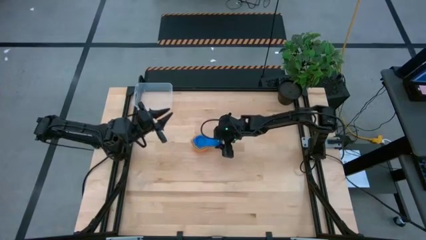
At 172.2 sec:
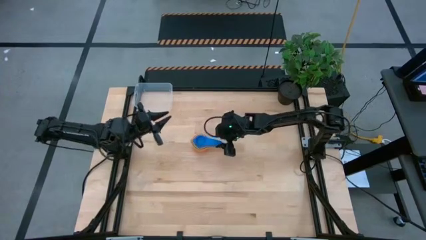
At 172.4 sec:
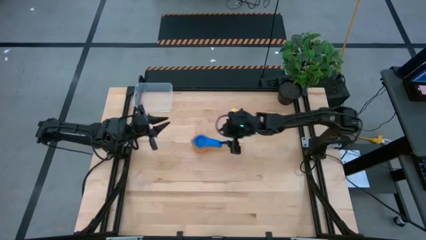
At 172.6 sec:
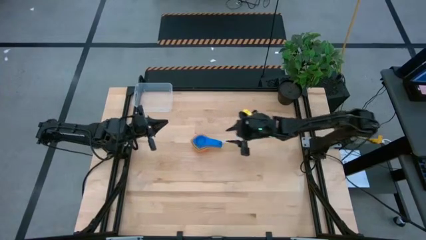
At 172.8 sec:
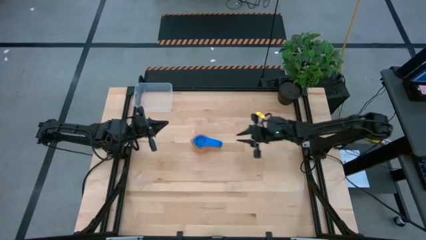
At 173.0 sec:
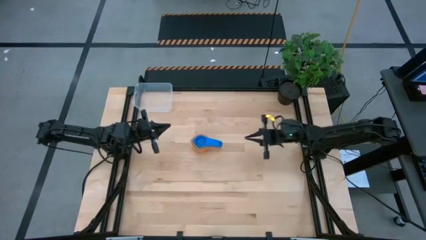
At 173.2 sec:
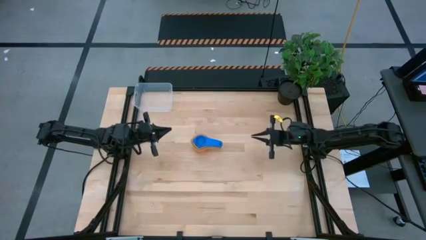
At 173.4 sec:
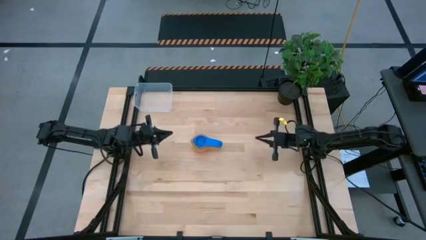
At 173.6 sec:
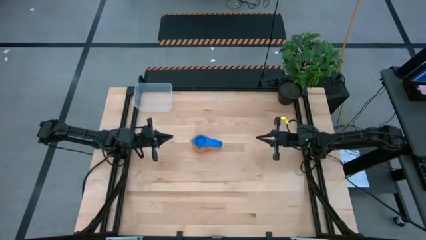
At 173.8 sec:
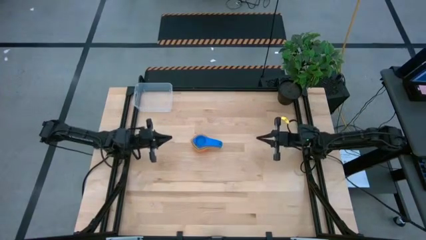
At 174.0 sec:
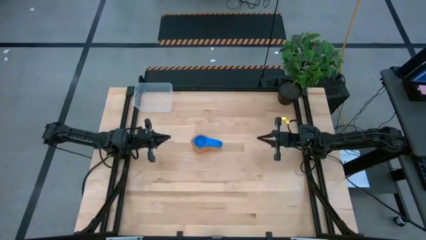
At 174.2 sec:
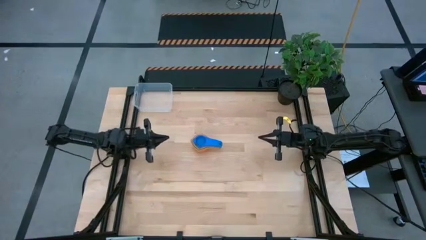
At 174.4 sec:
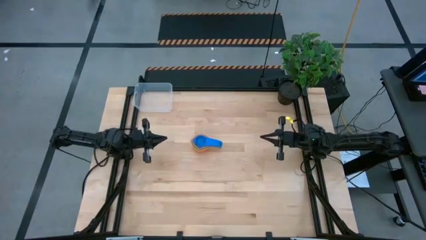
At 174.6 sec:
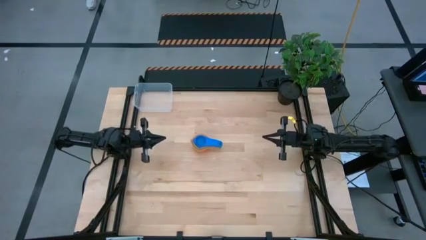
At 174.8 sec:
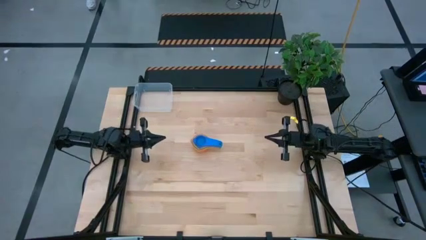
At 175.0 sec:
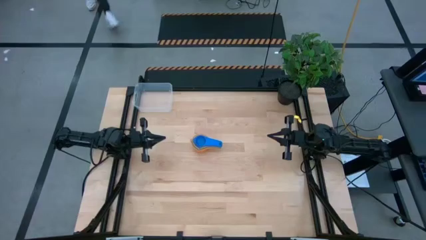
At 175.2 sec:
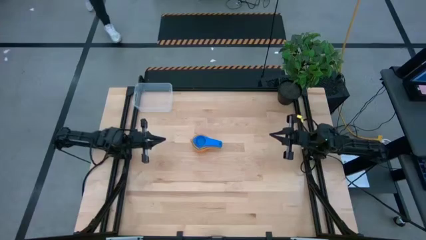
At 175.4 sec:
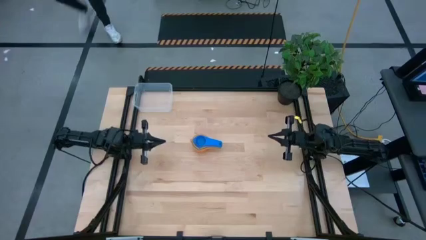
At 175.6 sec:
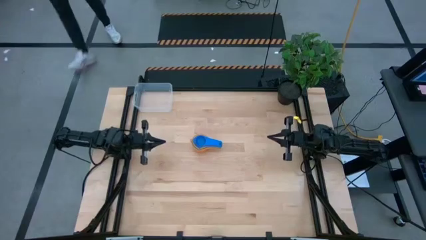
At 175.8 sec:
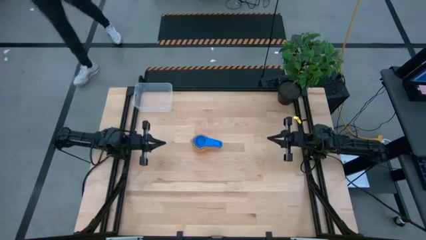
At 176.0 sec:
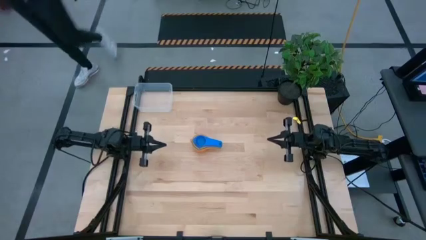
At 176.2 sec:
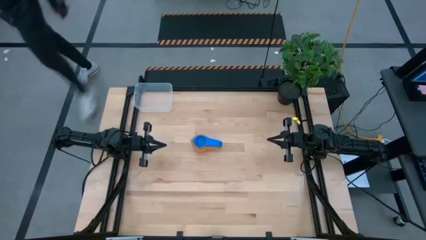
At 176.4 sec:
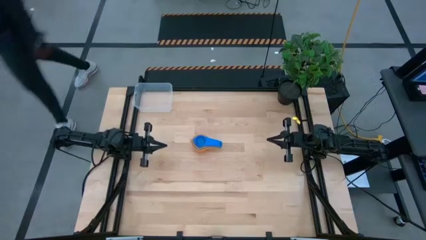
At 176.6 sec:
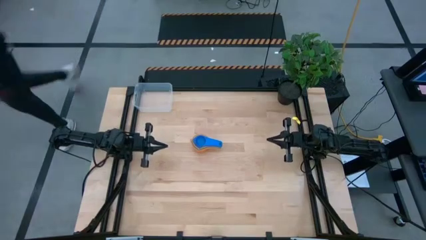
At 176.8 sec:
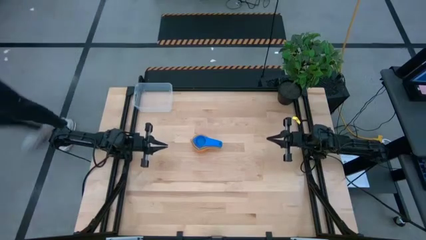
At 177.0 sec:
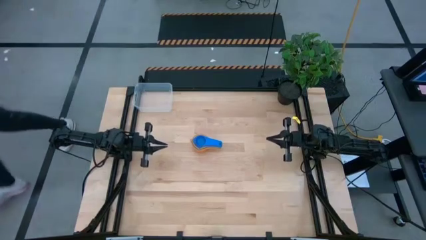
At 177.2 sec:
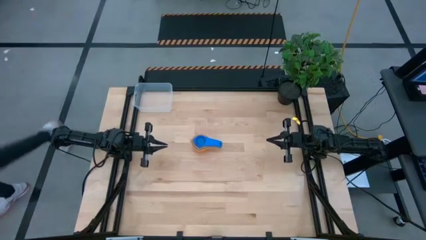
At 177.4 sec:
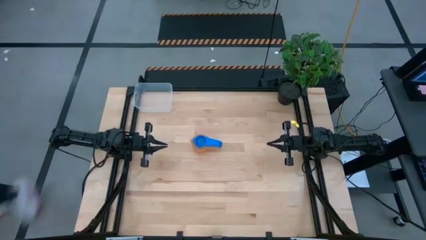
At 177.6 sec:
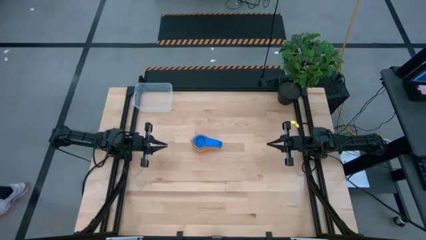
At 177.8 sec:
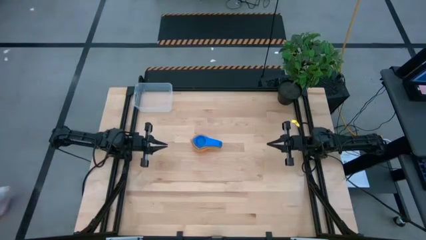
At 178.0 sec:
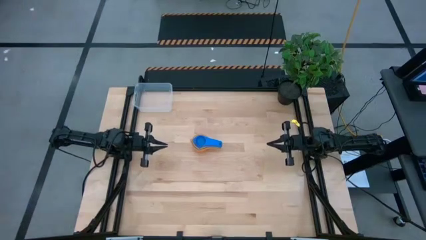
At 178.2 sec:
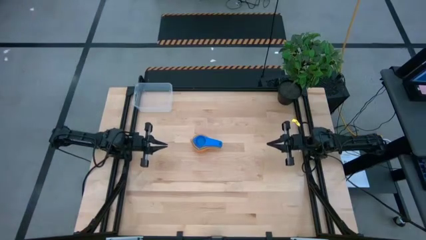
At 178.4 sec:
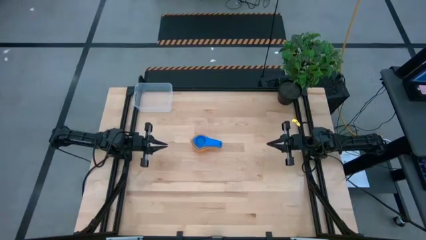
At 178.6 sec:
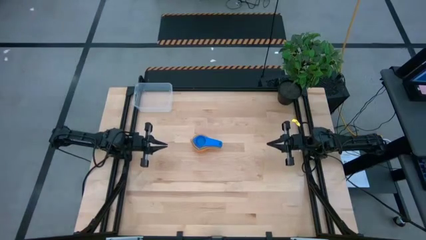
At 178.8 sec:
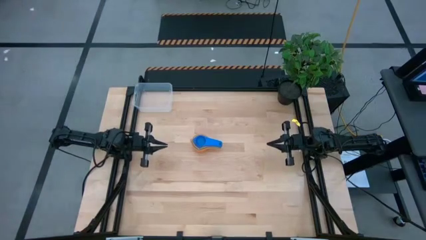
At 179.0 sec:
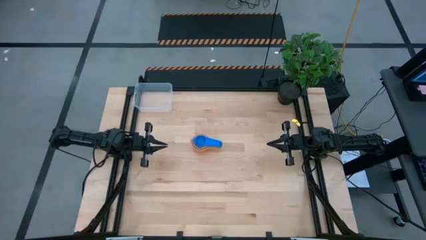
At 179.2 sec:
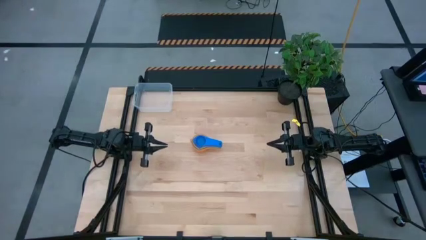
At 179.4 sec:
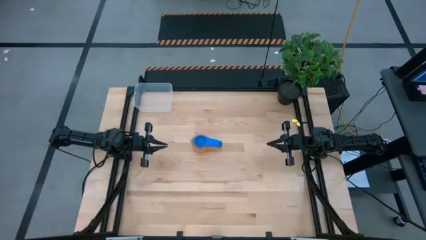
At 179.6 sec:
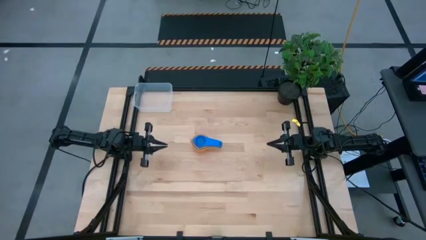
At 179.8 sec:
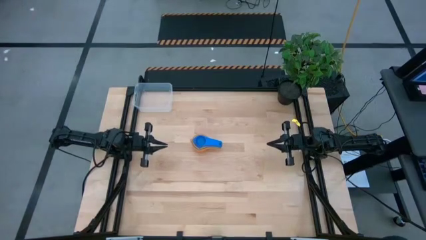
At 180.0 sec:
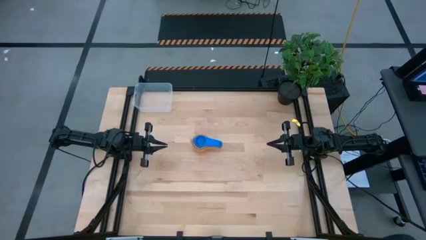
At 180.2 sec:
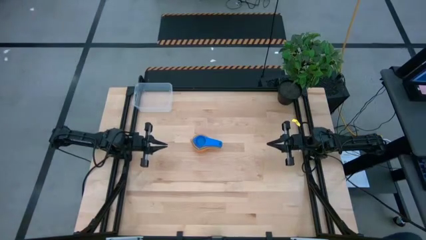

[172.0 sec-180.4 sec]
Task: Nest measuring cups in basket
Return to Home Position

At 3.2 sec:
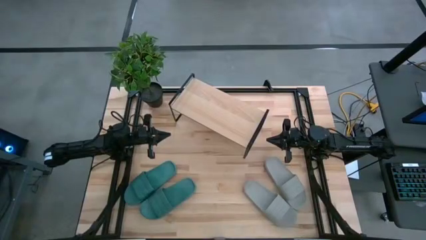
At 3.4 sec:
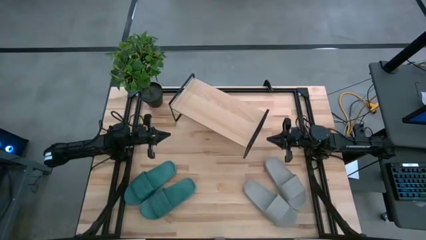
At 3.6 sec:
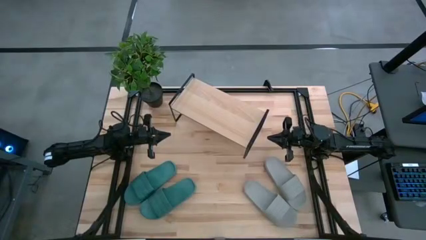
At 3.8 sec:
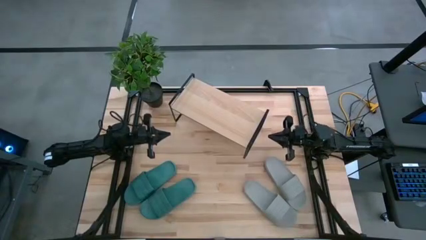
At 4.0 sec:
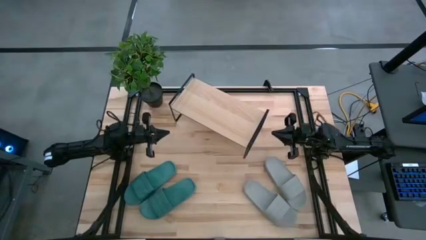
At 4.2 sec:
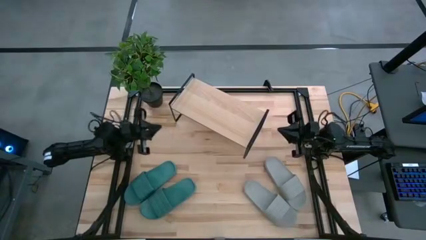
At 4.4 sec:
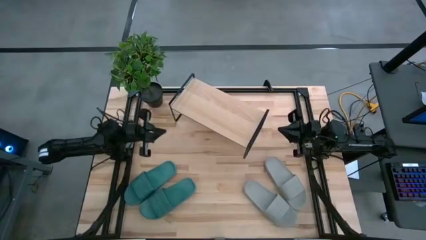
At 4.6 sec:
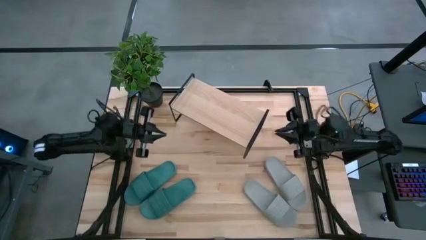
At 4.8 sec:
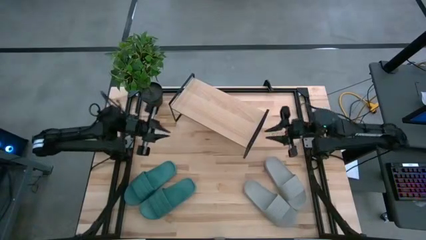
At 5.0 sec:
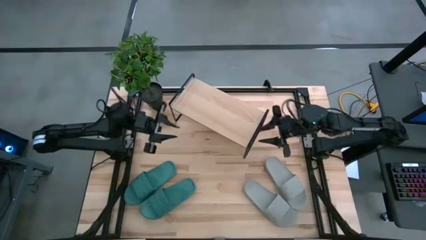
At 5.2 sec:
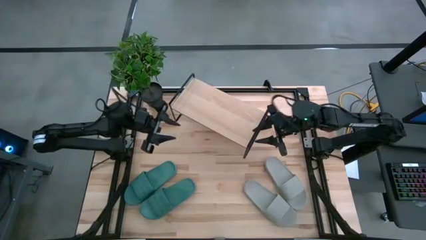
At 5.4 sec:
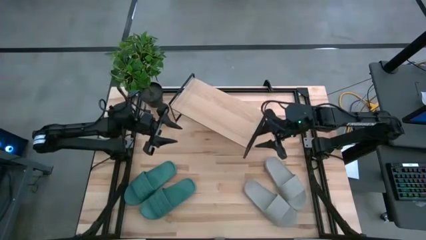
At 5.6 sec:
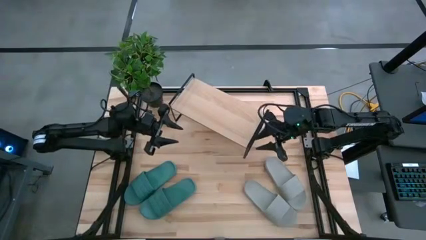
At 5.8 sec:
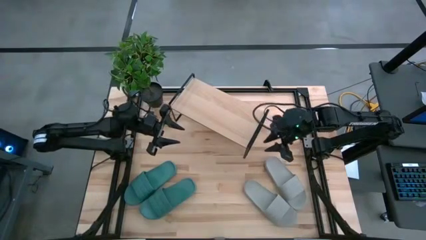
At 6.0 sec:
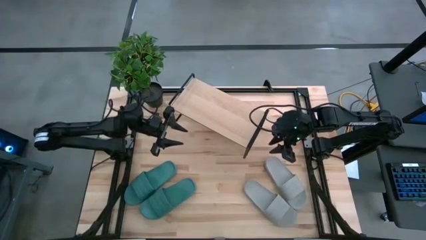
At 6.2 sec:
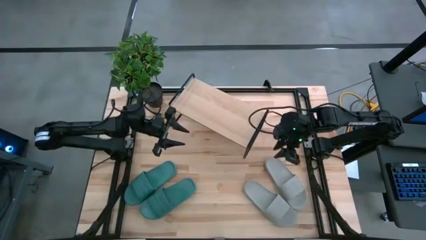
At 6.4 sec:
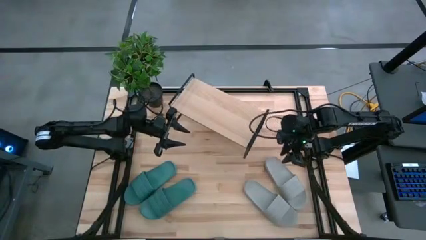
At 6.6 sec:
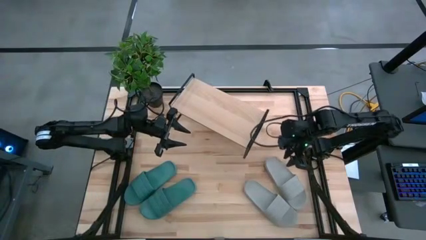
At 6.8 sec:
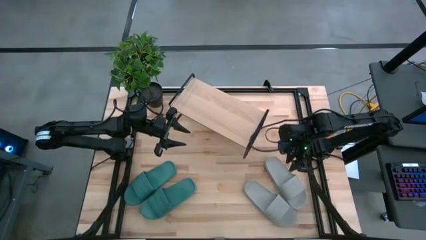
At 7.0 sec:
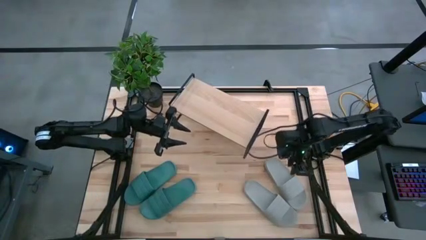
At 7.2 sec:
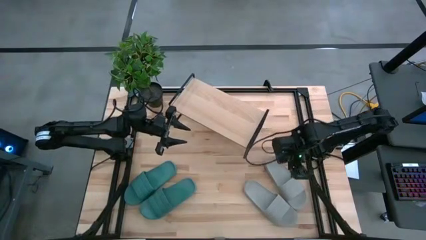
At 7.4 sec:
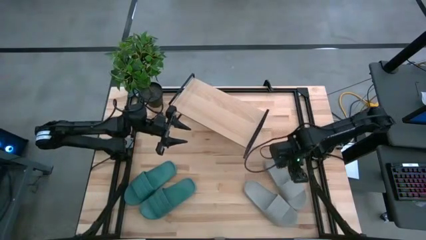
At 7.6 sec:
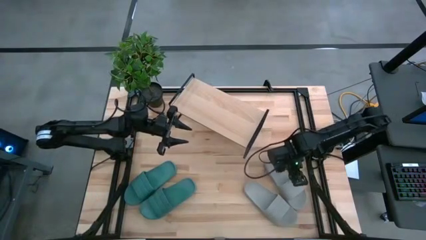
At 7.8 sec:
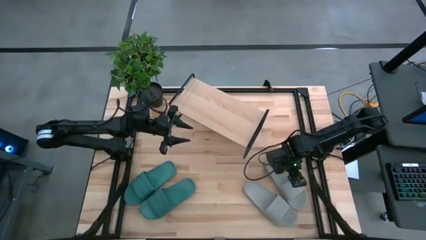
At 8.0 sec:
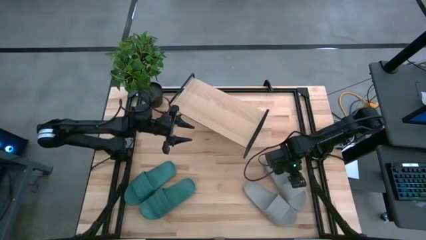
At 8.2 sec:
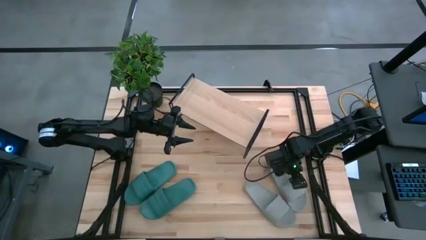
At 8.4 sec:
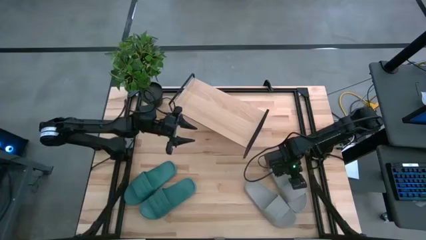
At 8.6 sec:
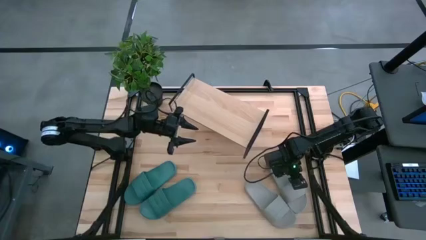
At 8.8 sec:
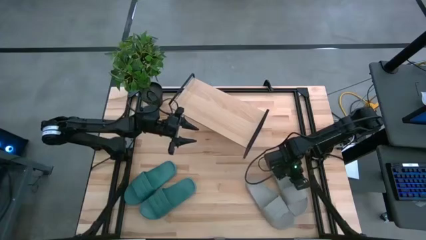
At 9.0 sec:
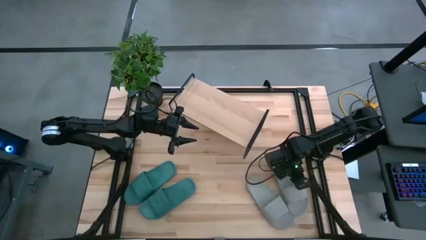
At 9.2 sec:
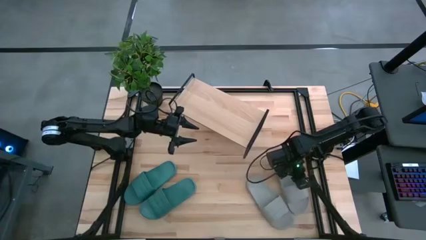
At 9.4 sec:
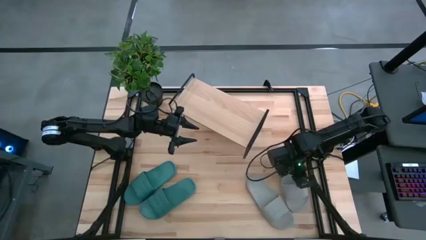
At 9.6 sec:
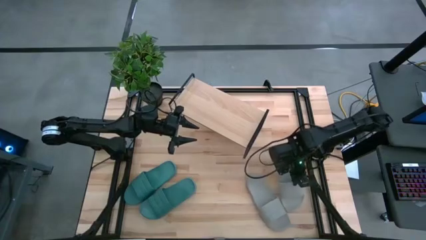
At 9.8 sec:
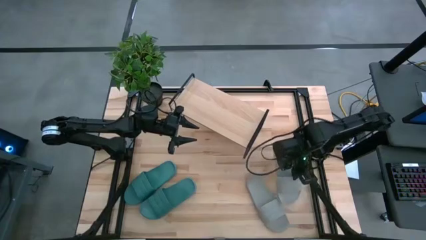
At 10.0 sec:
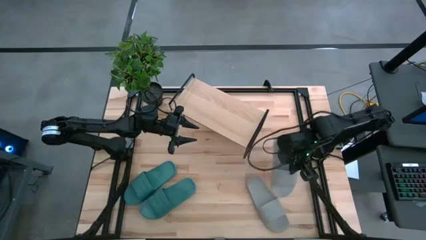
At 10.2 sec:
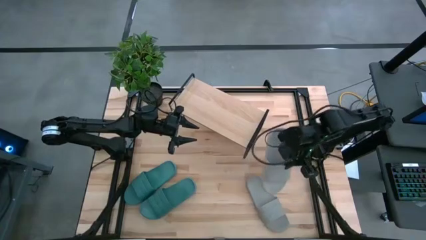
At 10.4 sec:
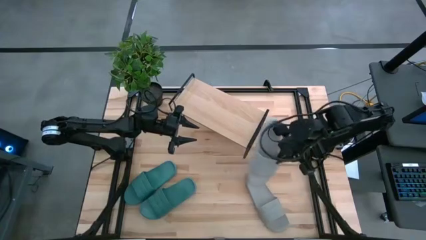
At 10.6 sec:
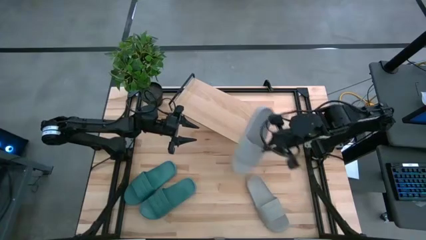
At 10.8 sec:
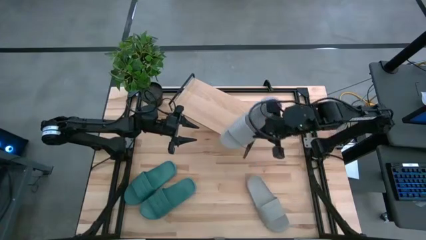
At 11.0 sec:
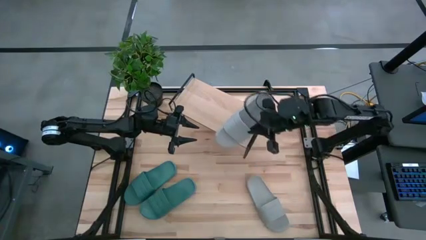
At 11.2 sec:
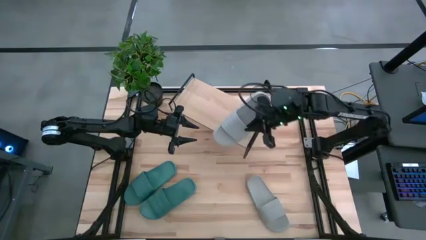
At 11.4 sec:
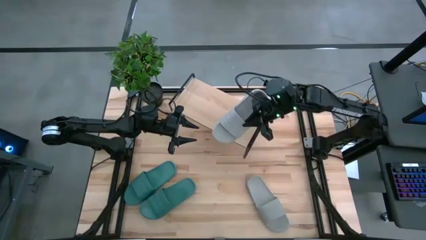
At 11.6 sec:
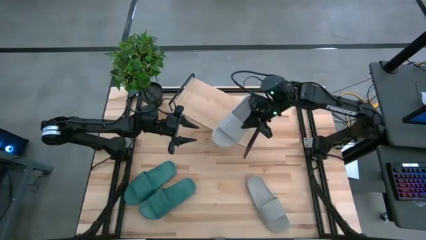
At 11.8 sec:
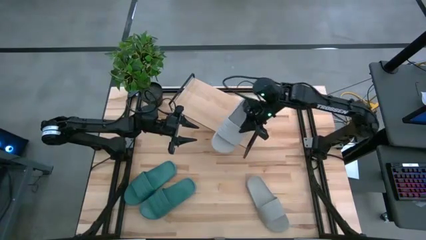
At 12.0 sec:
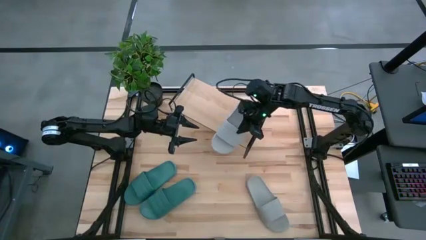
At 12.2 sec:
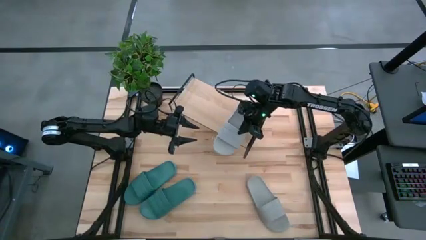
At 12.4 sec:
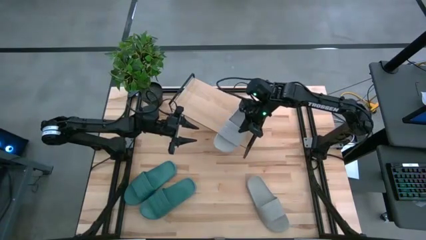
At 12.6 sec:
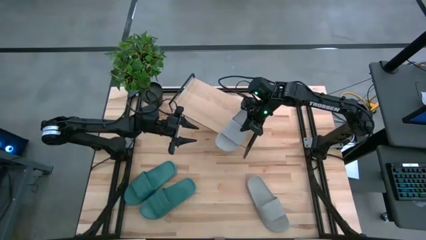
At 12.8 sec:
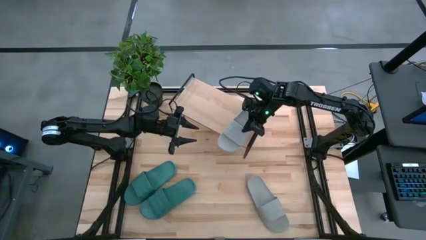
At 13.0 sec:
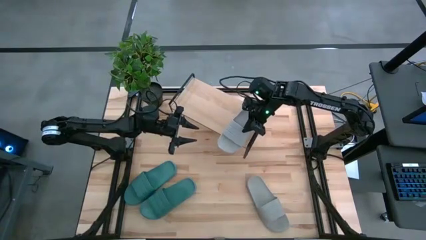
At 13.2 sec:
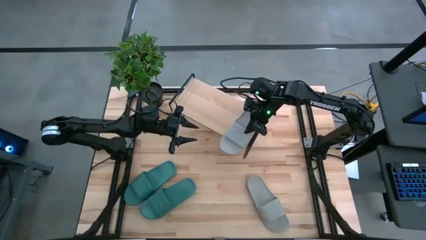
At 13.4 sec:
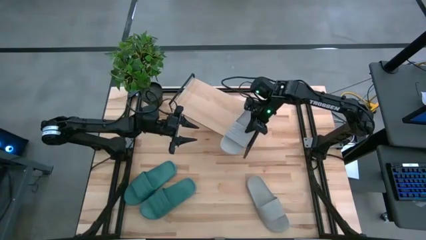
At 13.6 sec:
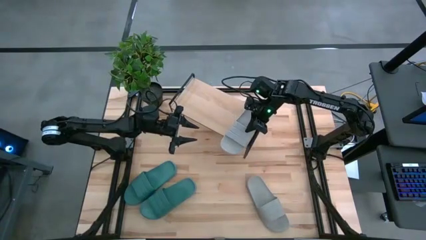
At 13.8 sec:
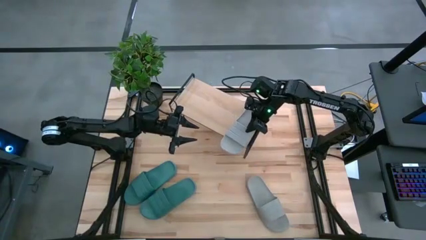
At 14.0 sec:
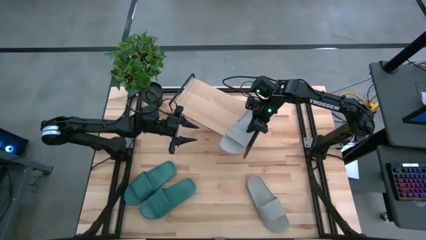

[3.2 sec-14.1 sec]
Task: Pick and place slides into the shelf
Put the top right gray slide on the shelf
